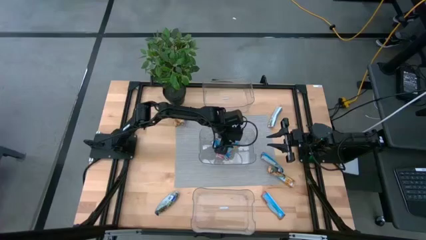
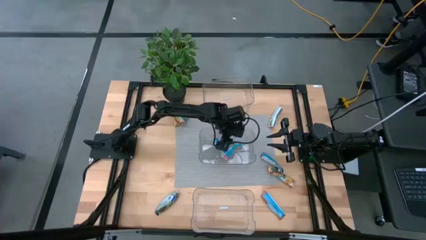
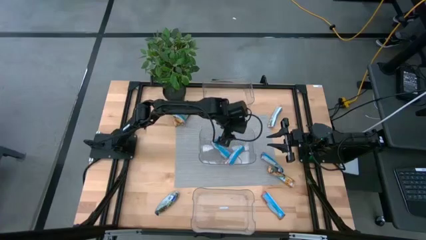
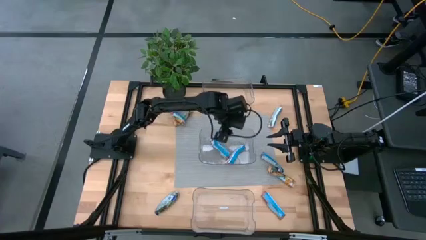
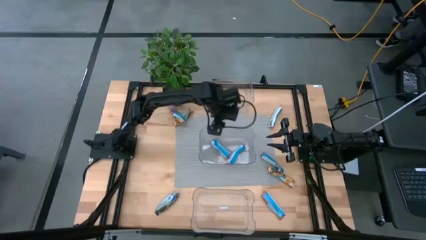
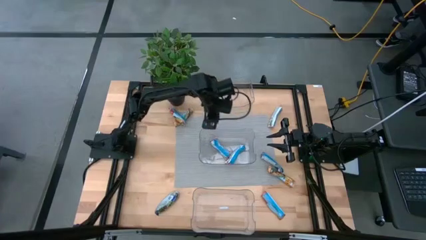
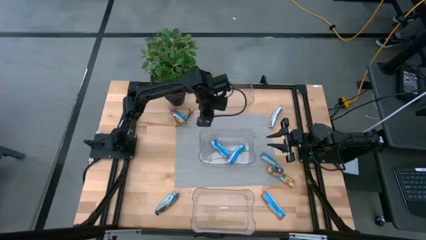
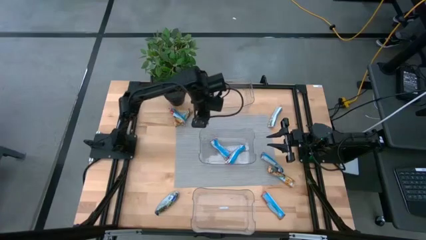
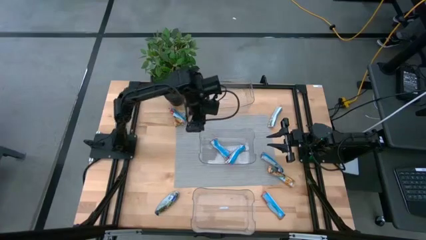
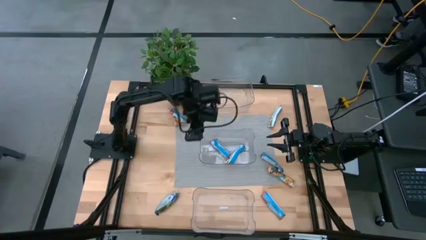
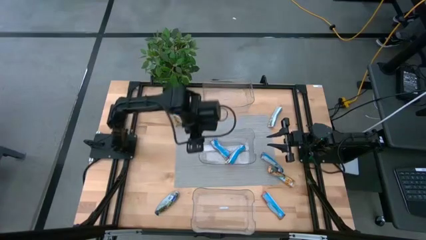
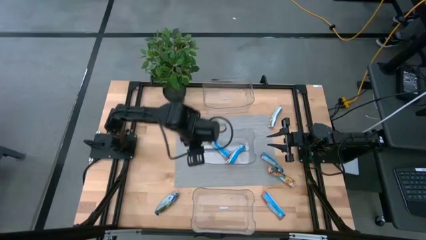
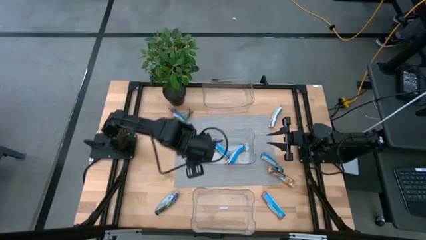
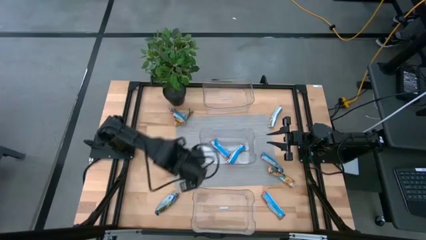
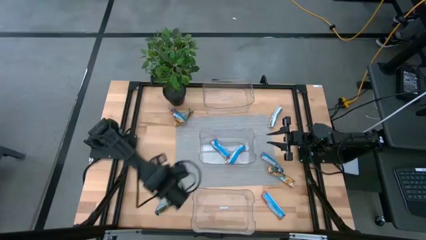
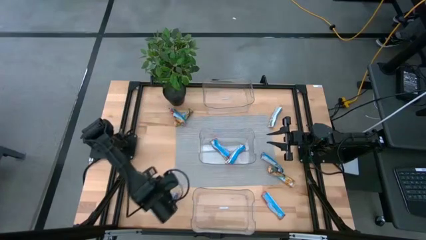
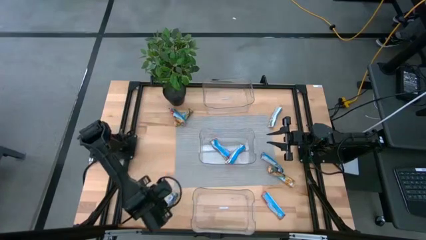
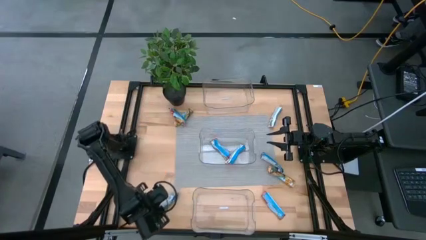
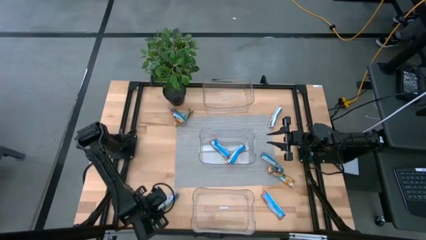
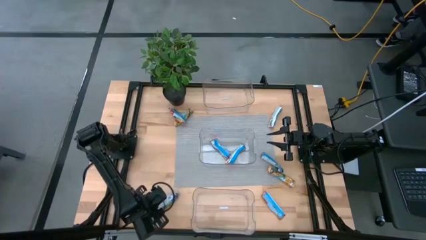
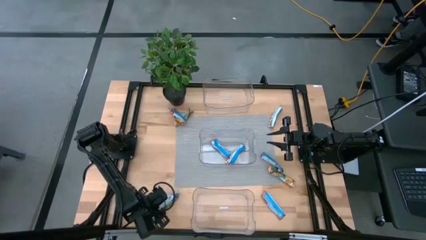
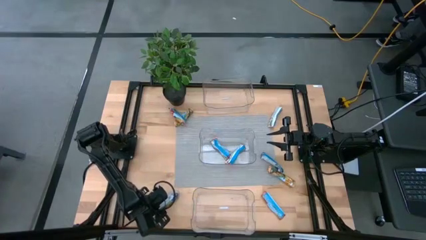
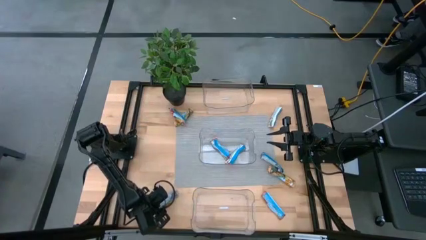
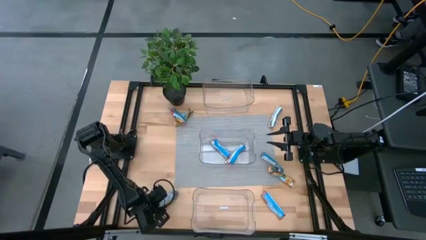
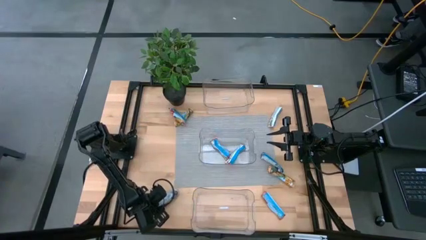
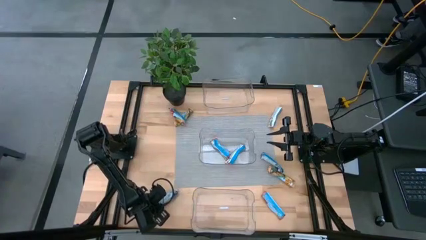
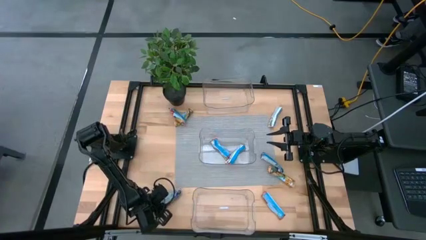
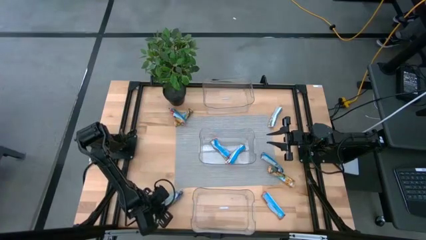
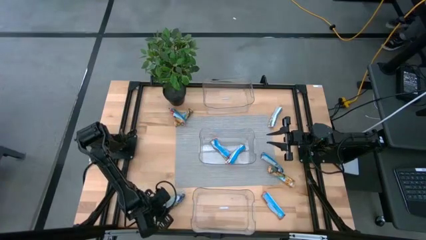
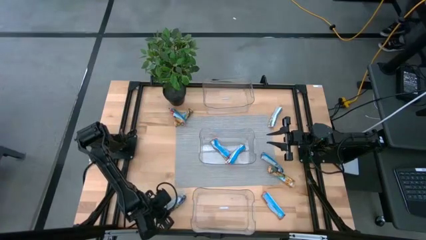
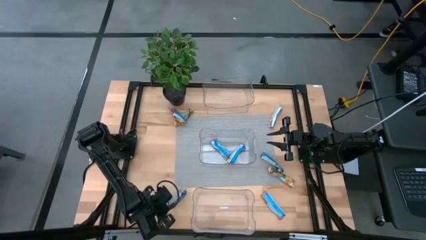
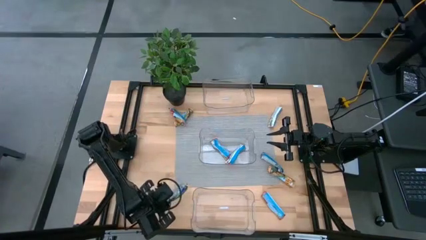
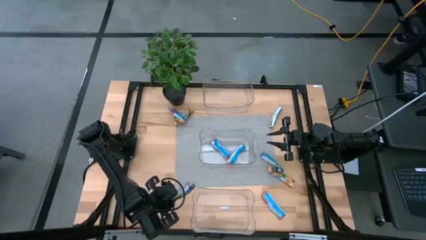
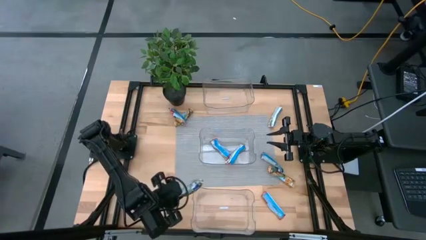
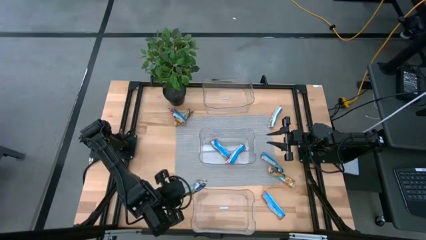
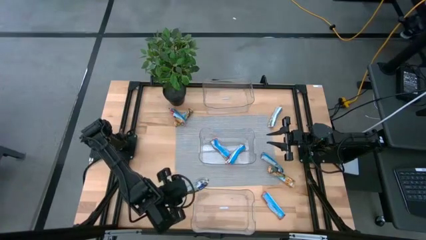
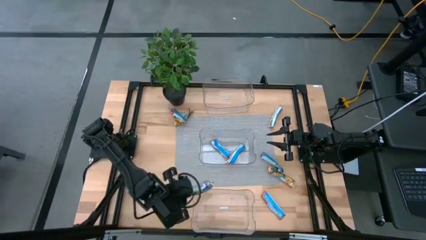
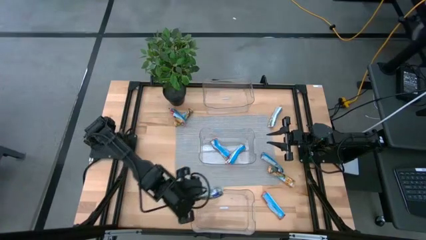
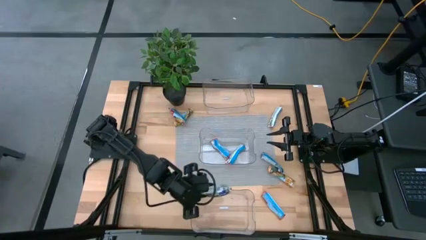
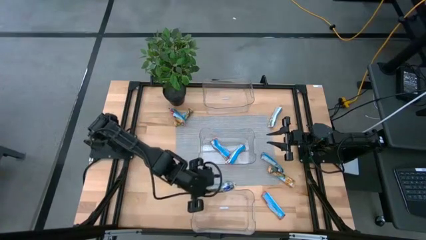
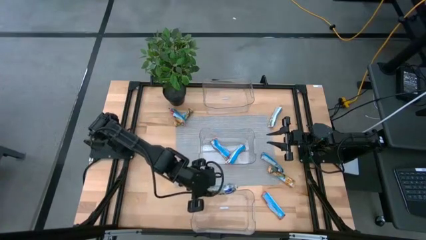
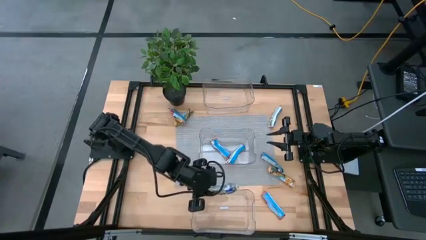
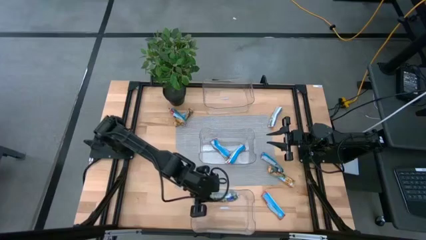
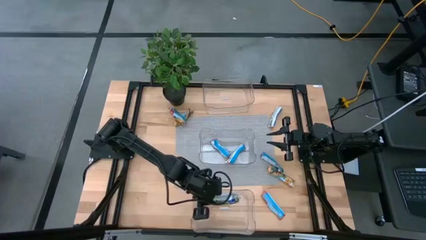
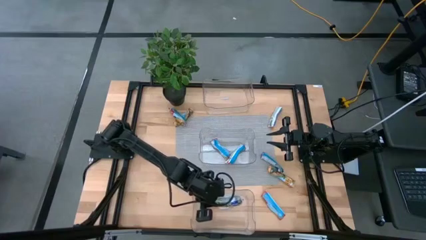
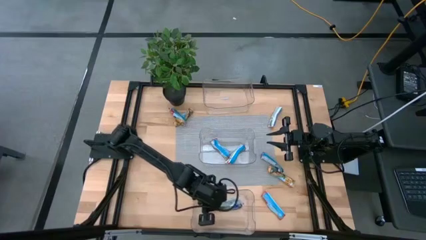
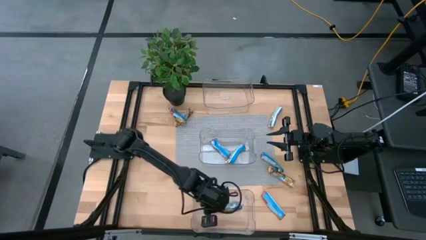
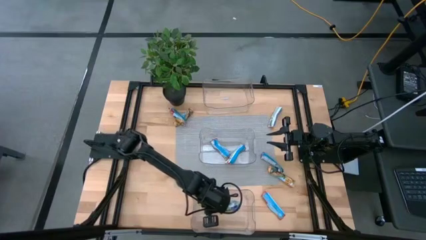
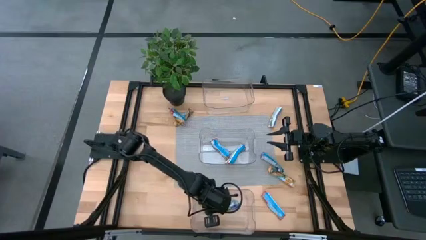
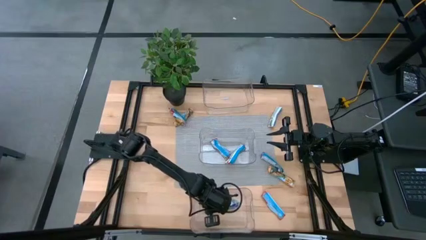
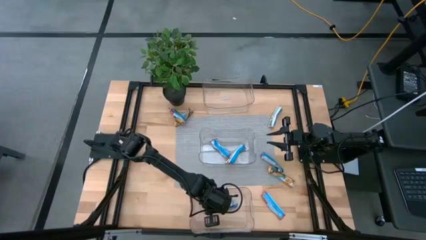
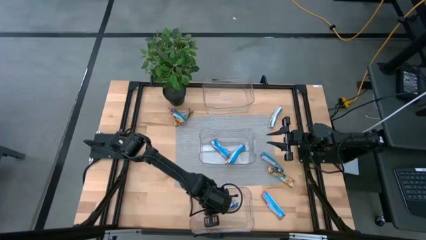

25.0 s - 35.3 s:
Task: Pick and place Granola Bars by type
Put the blue granola bar into the bottom transparent bin

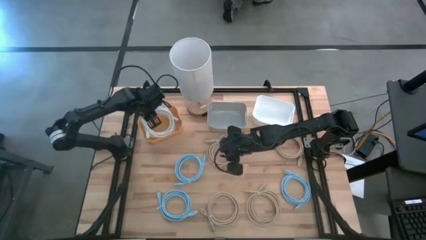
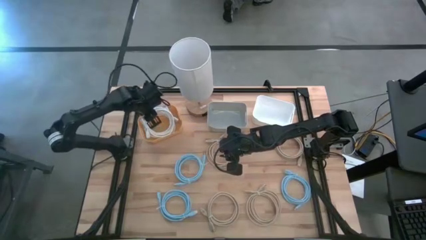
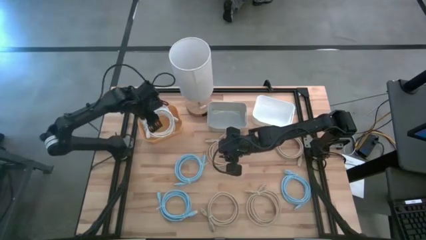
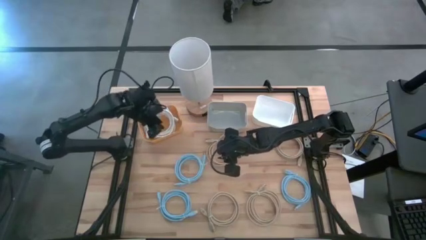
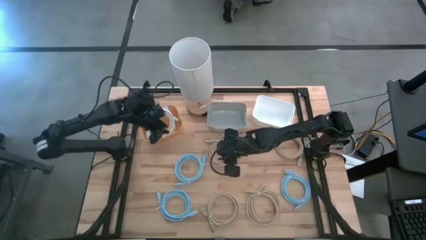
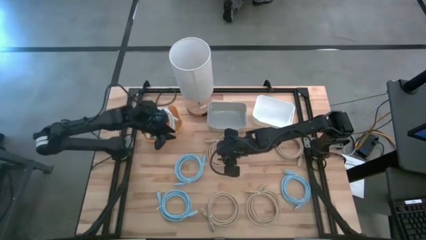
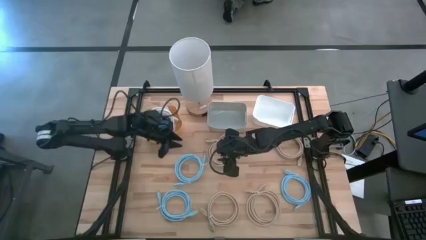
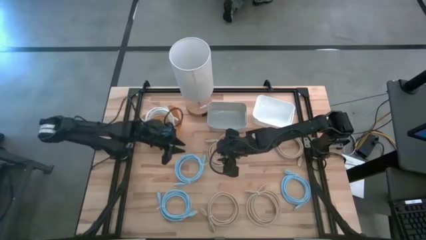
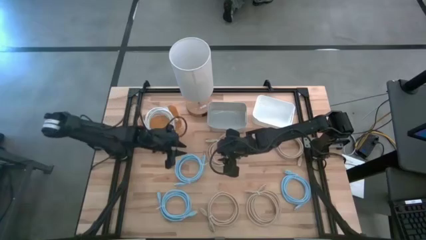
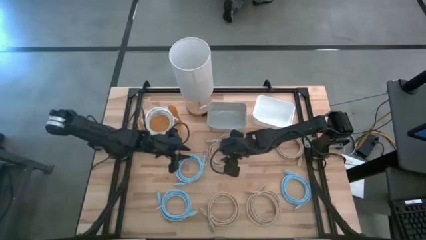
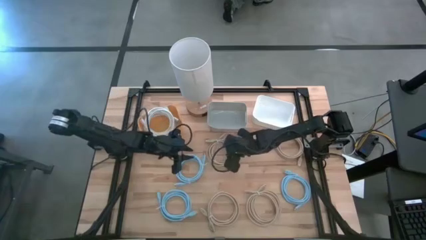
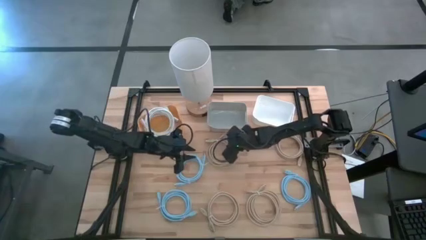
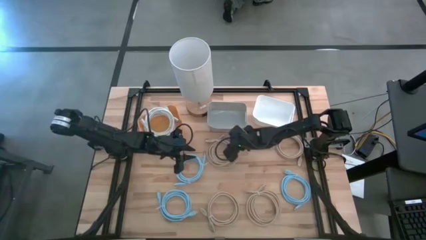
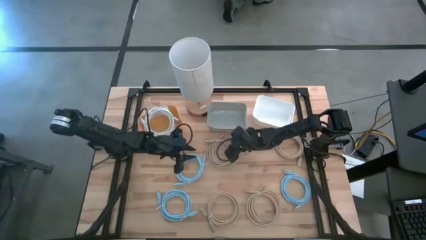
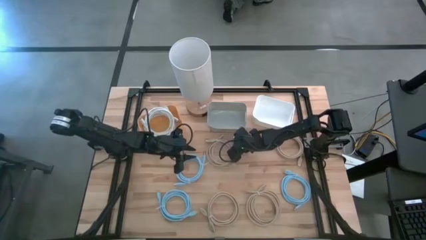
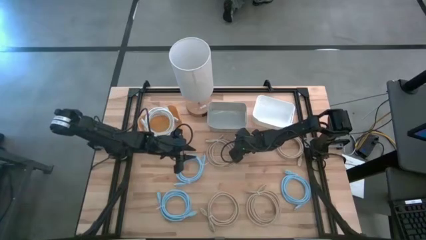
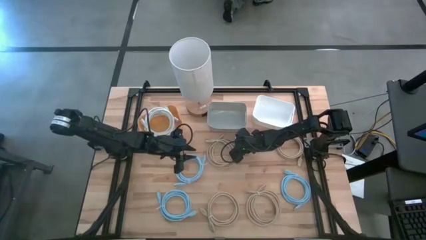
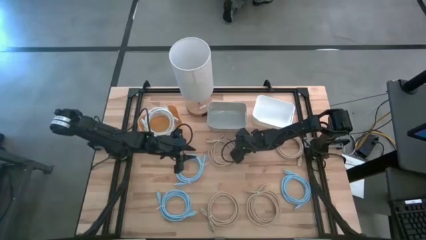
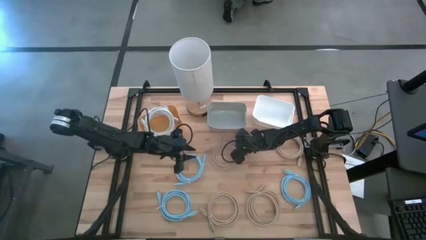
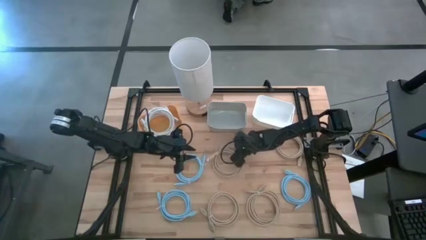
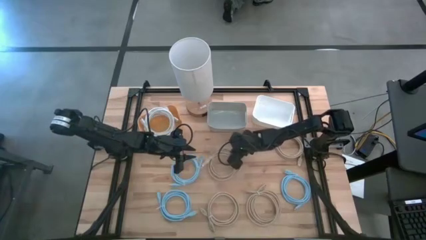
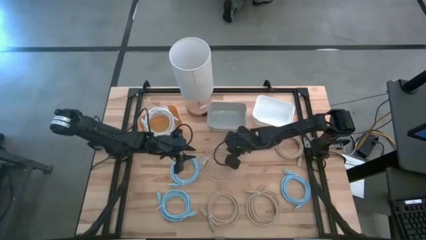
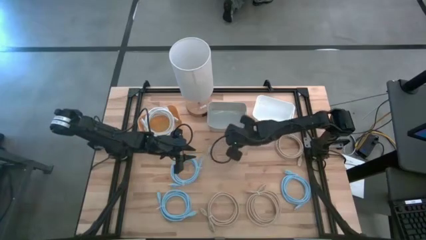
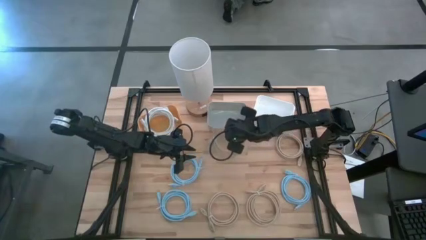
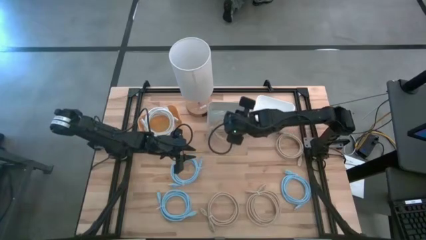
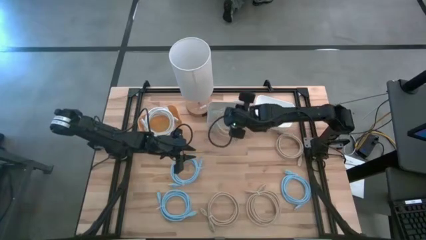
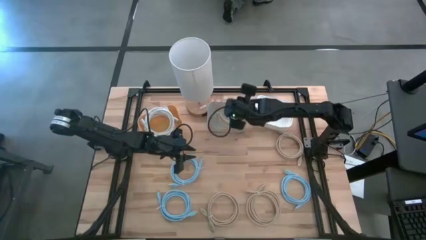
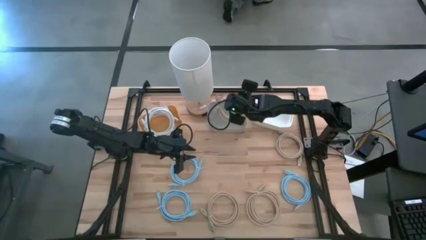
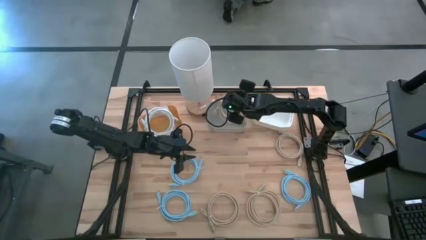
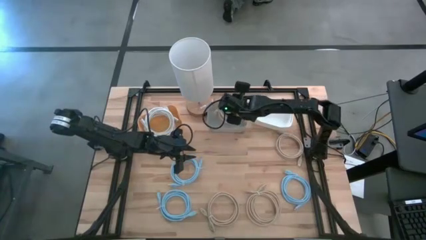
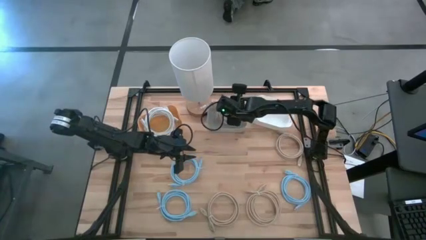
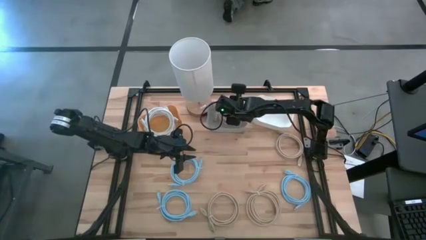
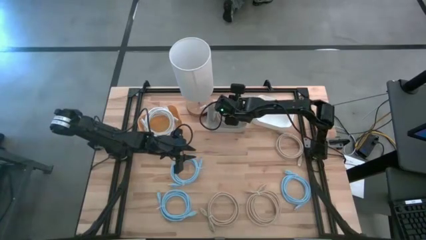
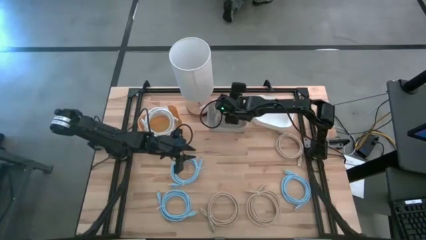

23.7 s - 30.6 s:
Task: Sort HDMI cables
Put the brown HDMI cable into the gray bin
